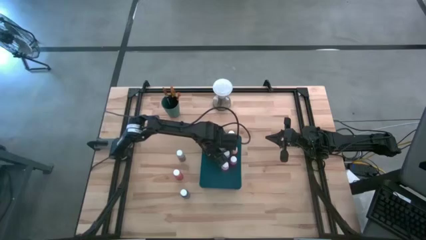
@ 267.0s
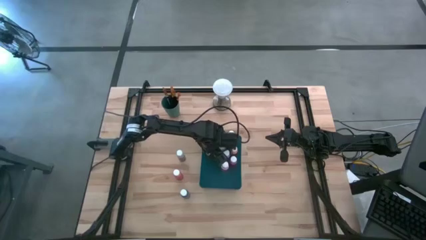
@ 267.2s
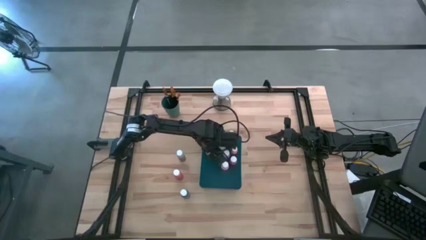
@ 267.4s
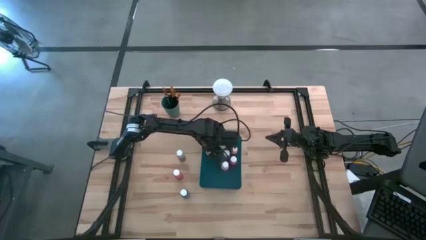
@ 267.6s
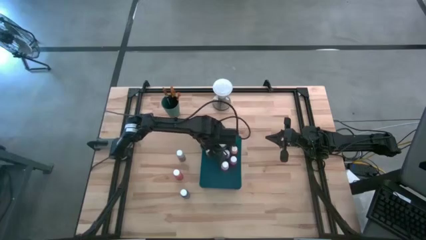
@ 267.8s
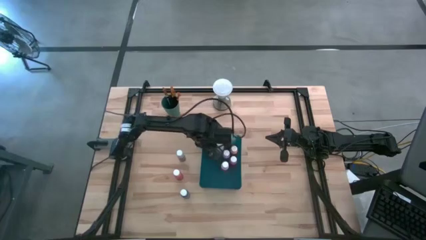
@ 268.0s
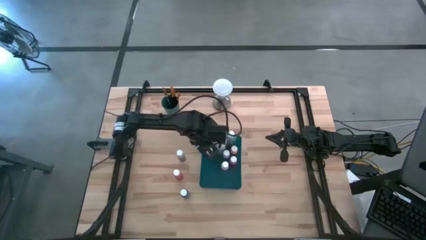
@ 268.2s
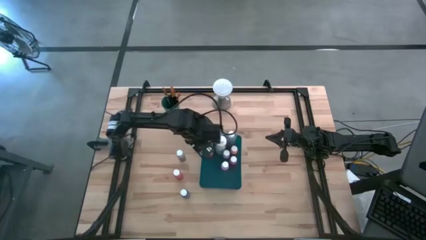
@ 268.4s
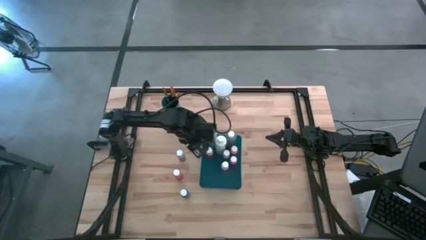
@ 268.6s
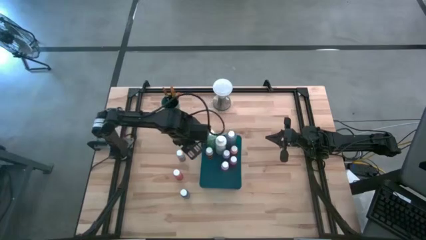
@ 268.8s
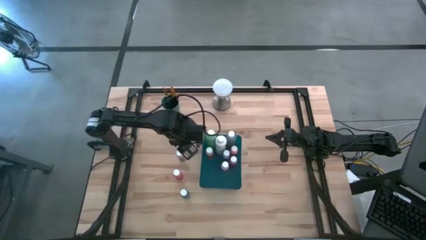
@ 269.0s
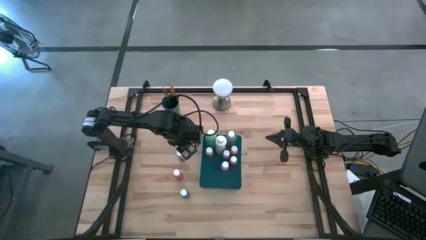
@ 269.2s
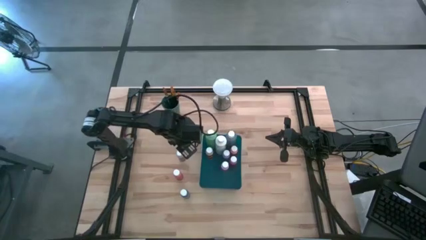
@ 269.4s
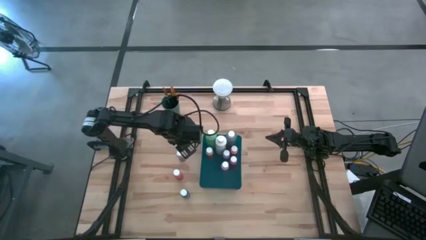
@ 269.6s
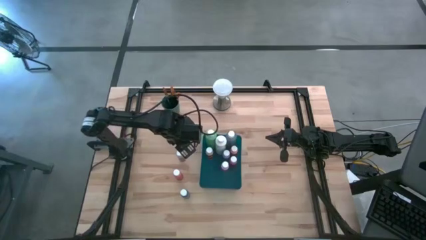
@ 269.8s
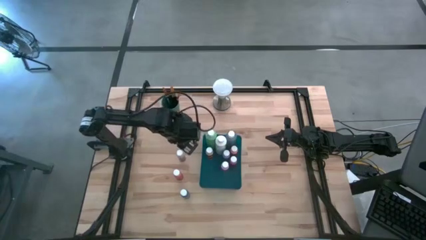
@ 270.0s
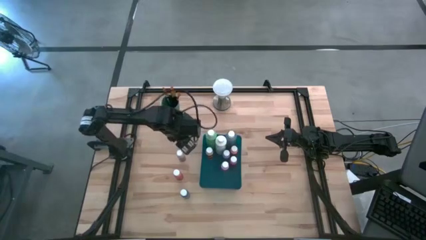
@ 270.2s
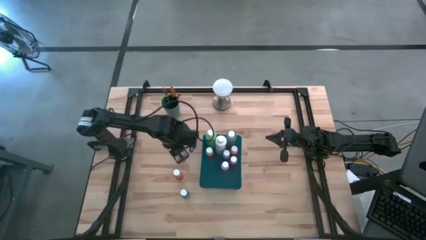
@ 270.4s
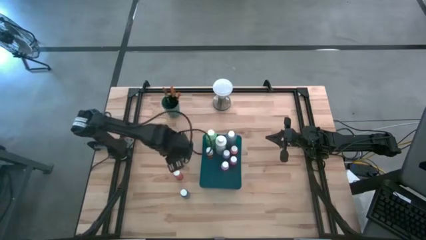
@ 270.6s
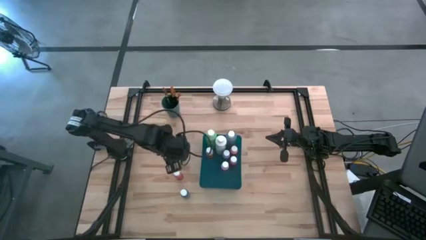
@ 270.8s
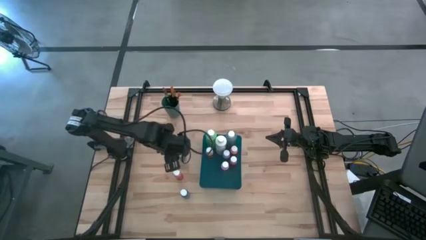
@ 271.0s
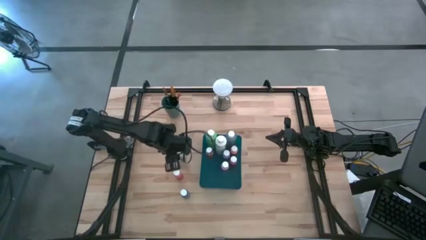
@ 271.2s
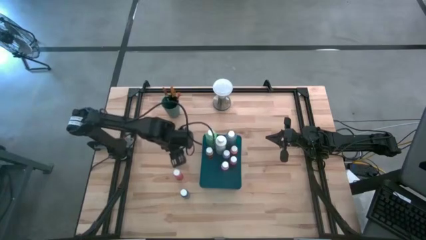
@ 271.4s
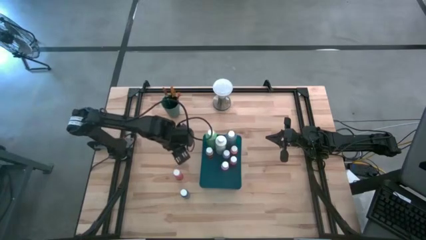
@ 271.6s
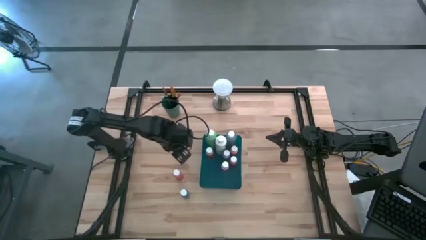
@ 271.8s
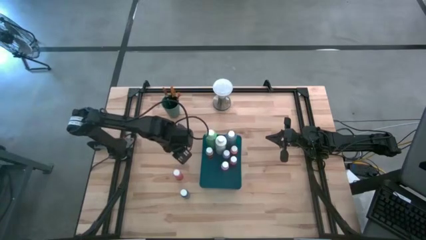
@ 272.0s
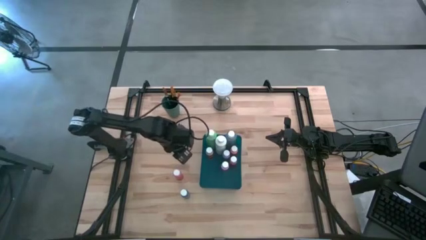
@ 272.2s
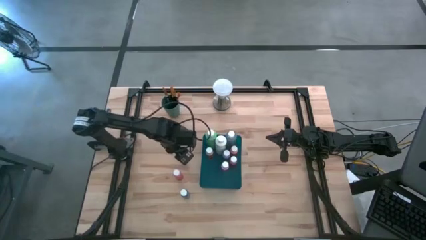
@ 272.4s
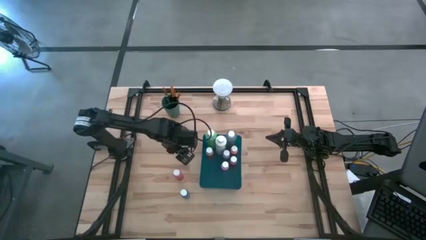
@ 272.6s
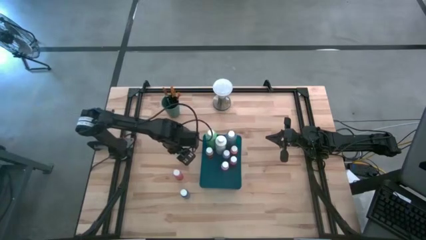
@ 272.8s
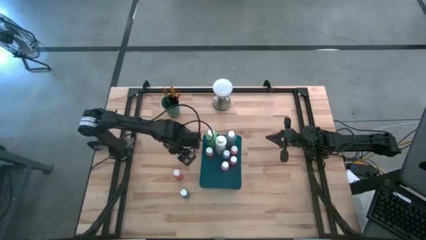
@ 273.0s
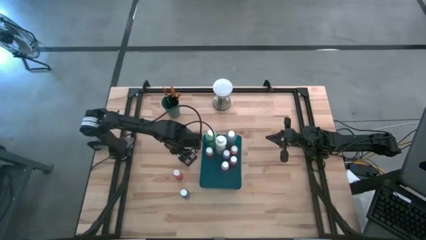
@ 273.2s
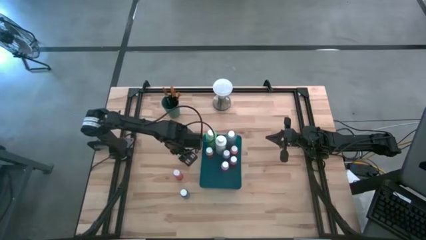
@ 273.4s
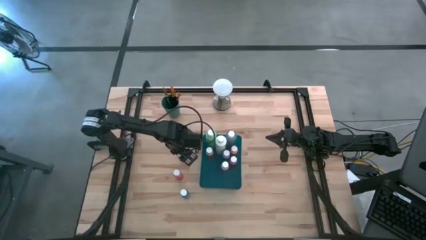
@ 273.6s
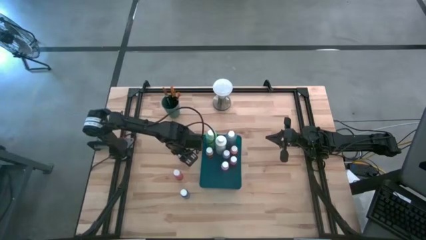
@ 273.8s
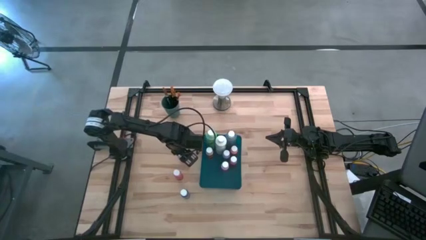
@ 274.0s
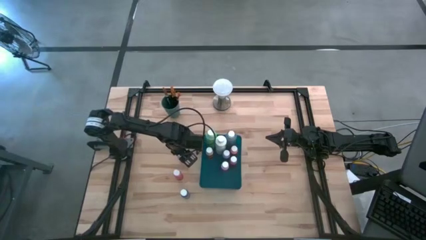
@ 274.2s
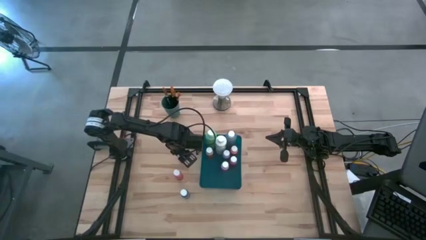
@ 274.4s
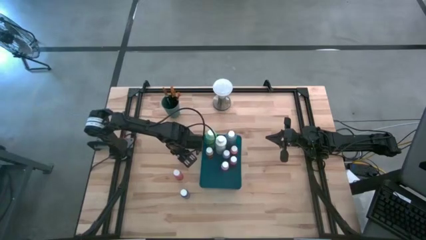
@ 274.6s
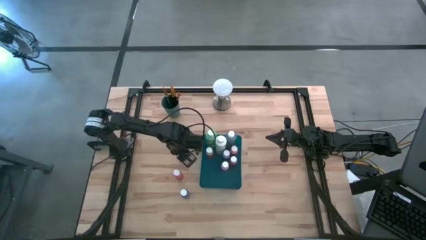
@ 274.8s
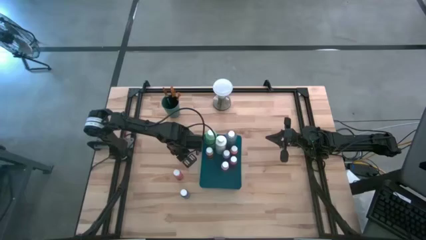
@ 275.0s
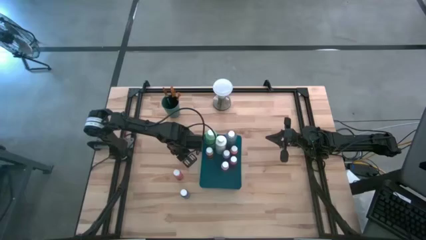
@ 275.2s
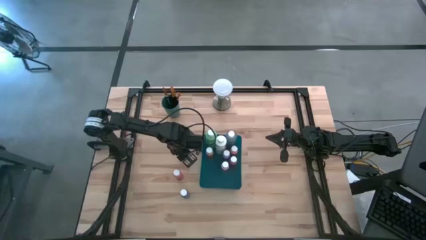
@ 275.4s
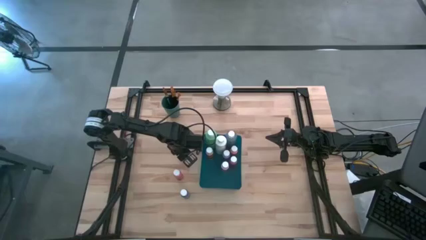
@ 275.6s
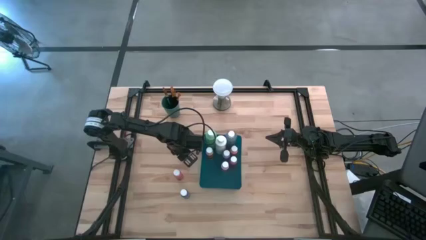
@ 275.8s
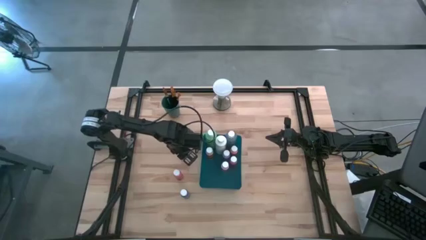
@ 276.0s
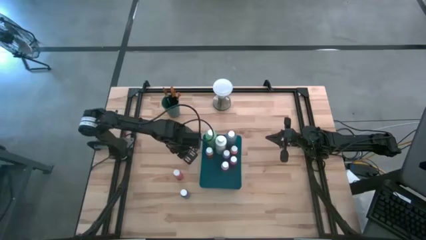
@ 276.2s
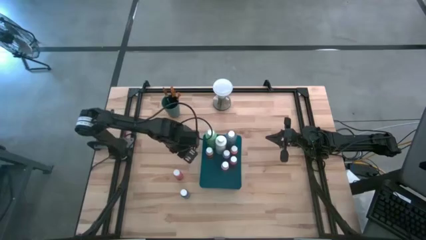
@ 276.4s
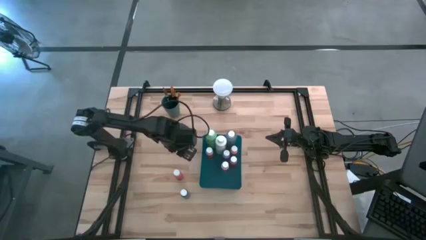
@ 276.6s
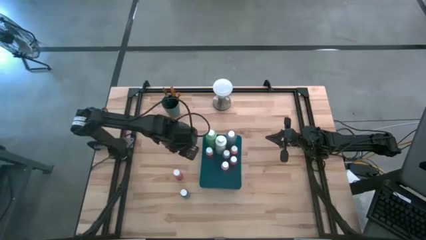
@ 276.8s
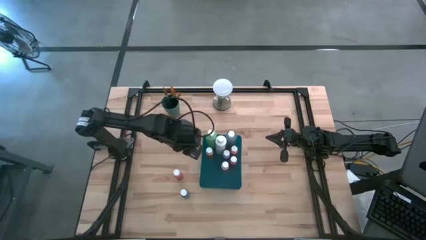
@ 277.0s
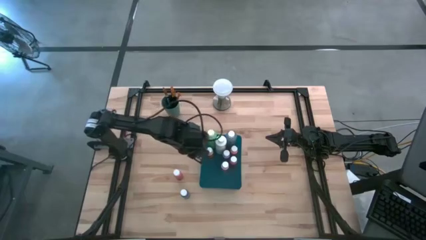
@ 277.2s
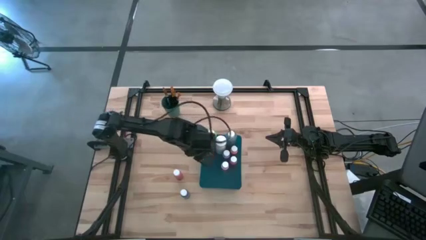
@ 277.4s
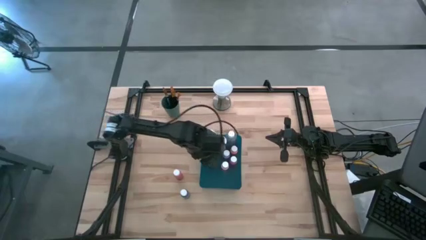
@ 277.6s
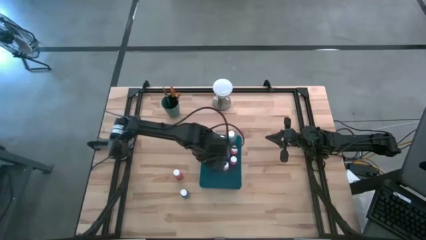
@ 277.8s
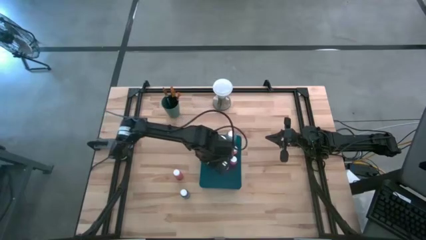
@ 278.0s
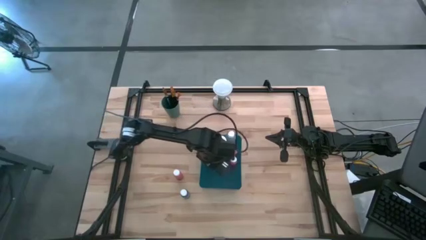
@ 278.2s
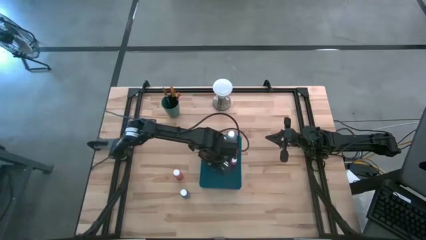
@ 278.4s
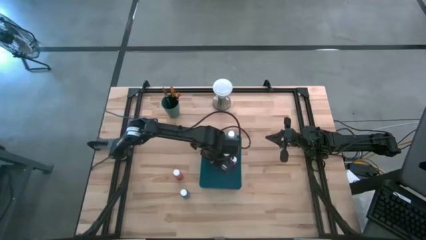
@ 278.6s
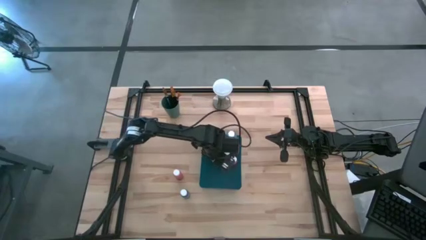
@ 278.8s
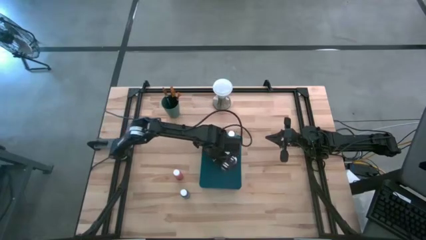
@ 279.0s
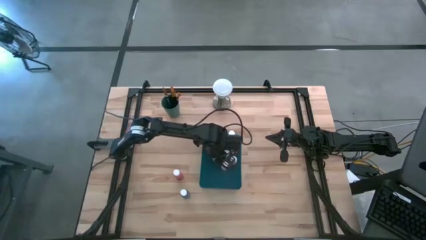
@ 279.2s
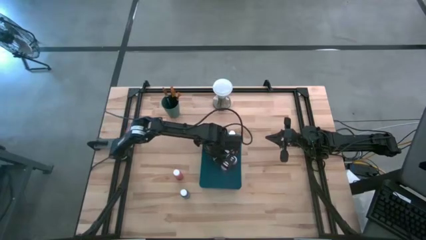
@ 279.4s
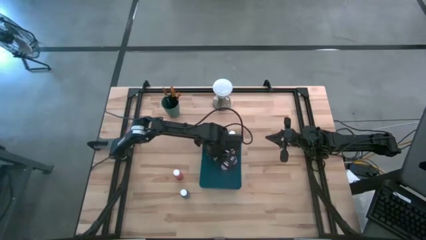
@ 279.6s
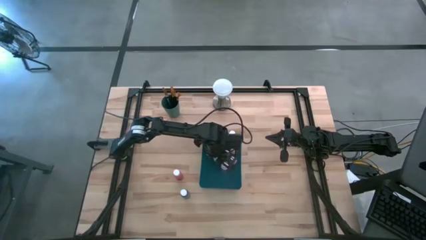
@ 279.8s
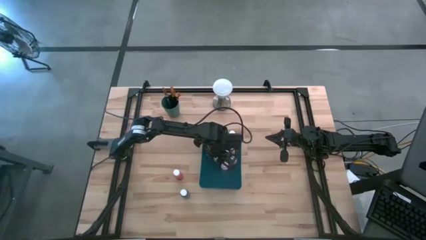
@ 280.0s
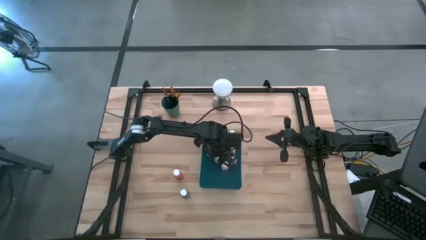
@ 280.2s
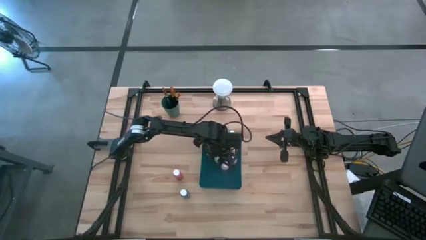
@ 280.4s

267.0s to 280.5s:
Task: Pick & Place Paint Supplies
Put the gray paint bottle into the blue bin

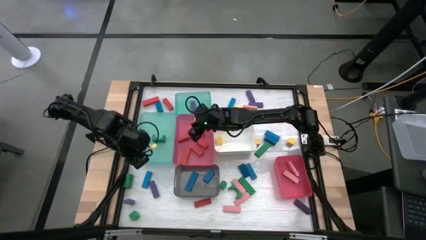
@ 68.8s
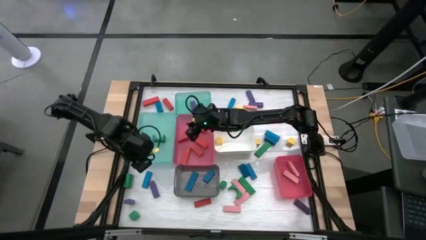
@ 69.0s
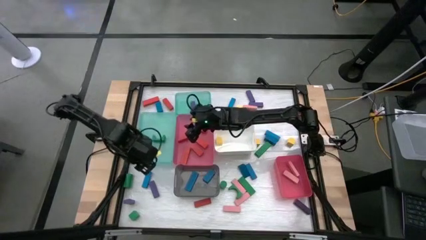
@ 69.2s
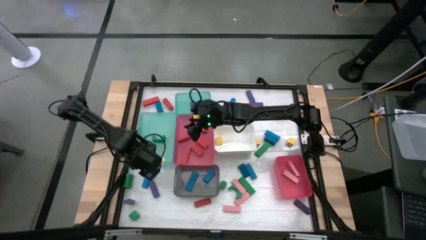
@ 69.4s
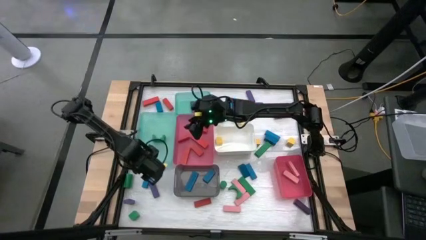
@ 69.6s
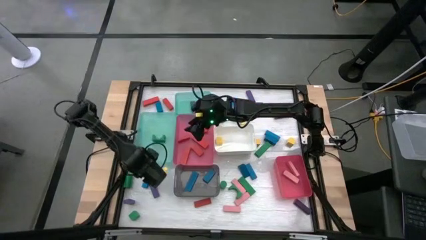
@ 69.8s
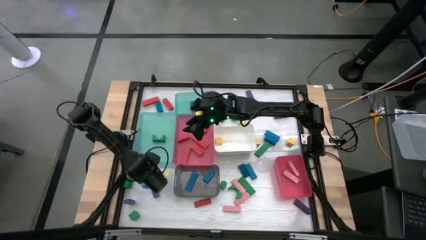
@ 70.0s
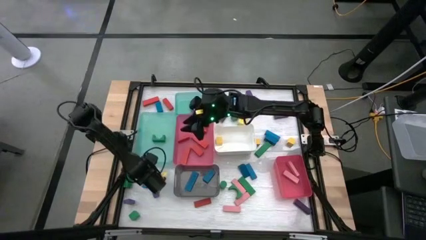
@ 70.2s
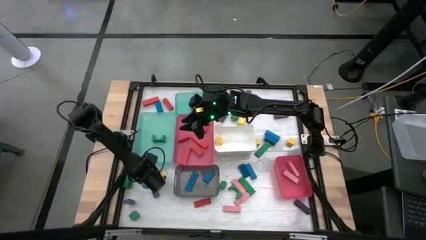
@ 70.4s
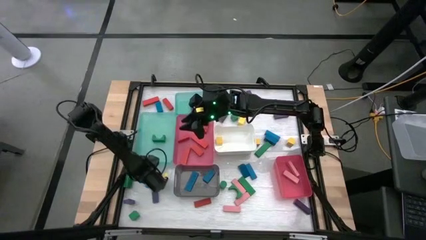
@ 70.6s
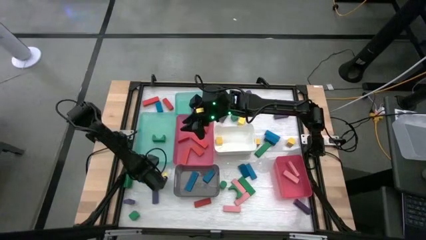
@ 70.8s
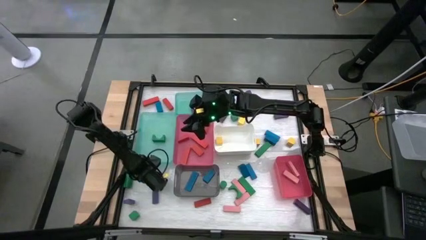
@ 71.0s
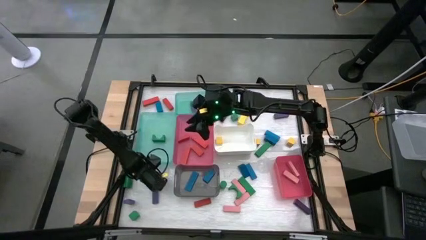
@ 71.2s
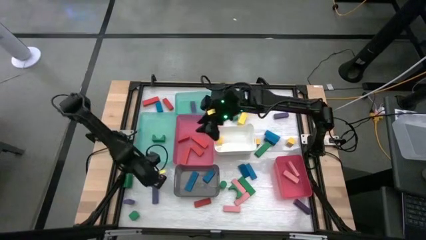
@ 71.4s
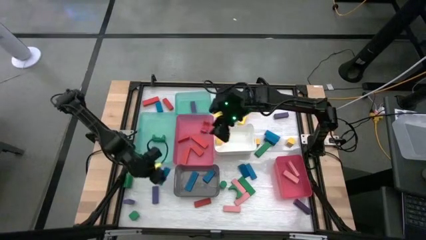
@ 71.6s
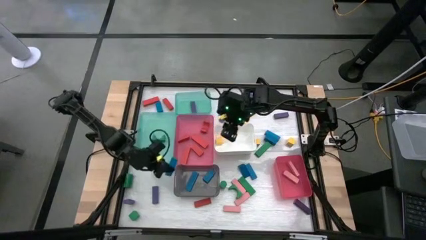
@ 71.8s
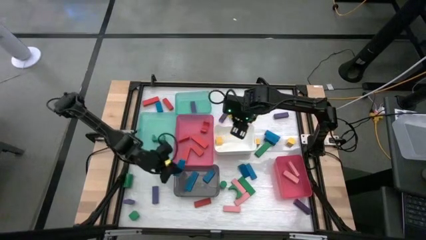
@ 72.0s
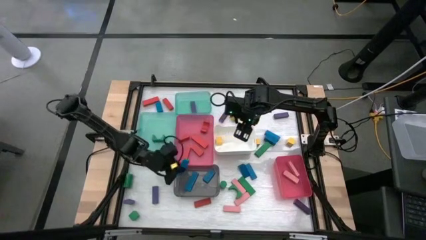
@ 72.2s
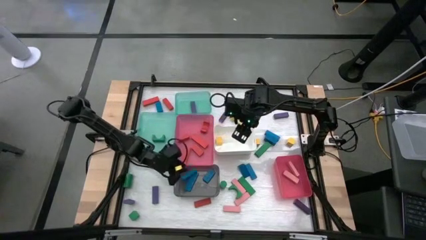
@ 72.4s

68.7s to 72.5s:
Task: Sort blocks
Put the blue block into the black transparent bin
